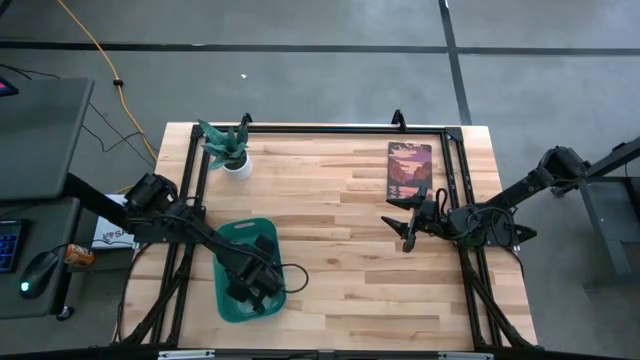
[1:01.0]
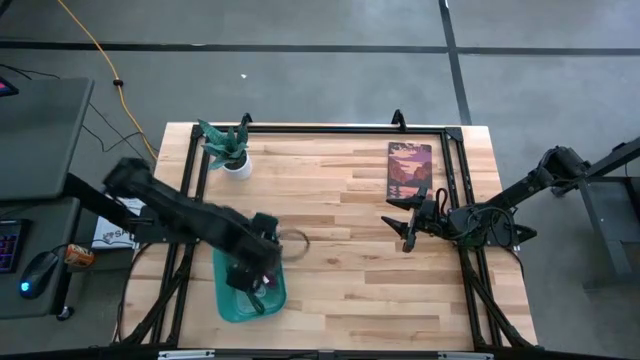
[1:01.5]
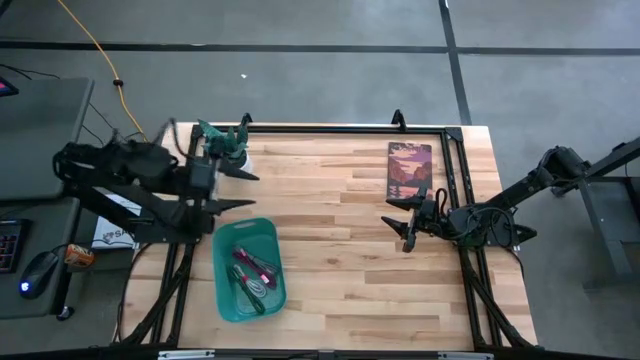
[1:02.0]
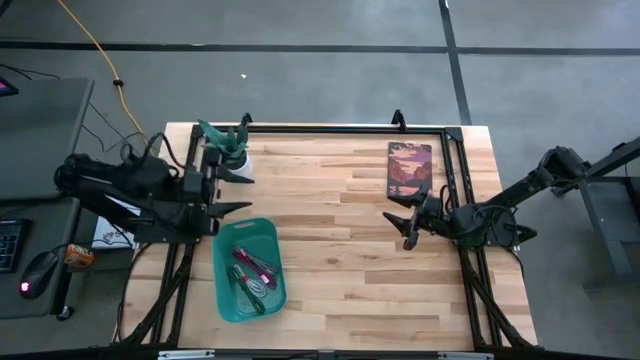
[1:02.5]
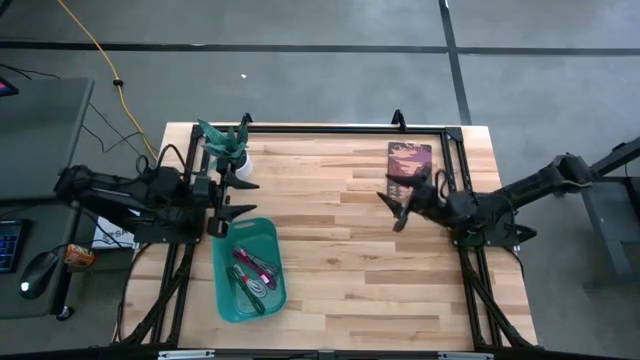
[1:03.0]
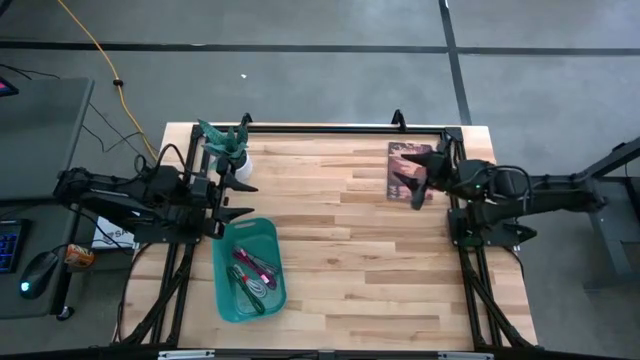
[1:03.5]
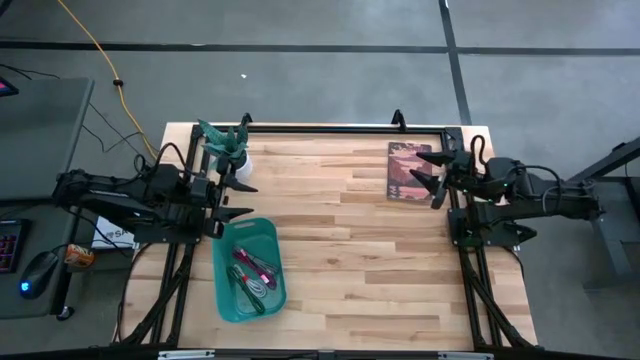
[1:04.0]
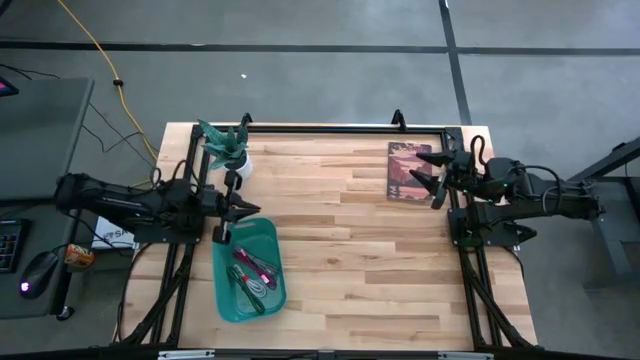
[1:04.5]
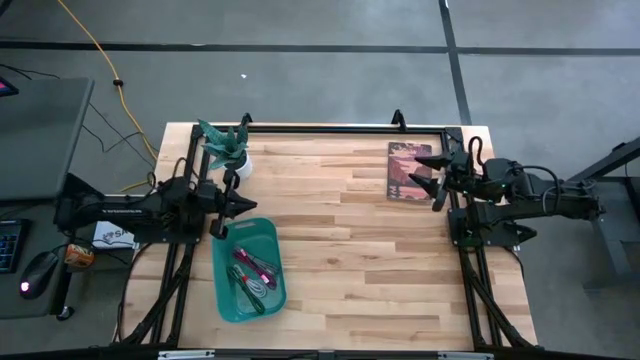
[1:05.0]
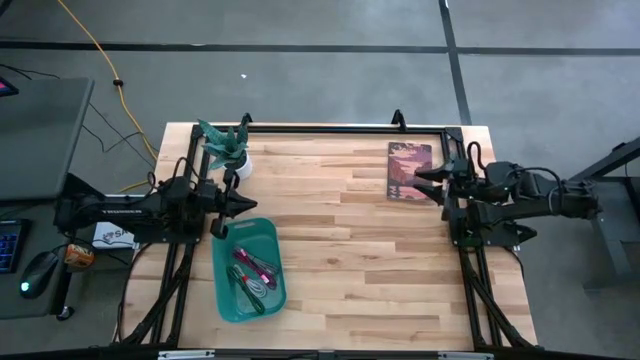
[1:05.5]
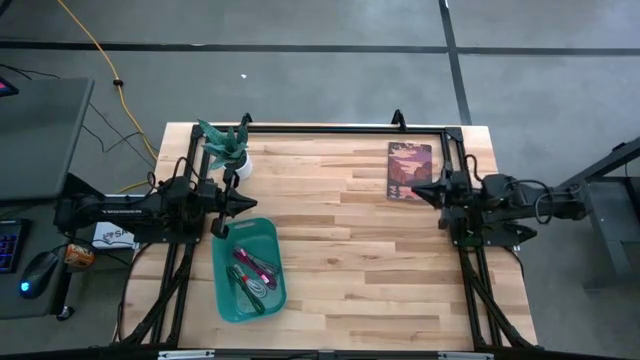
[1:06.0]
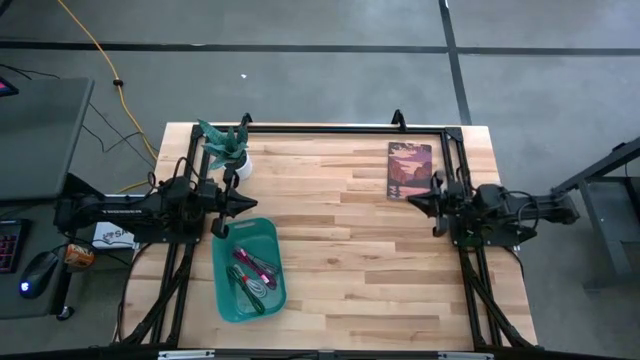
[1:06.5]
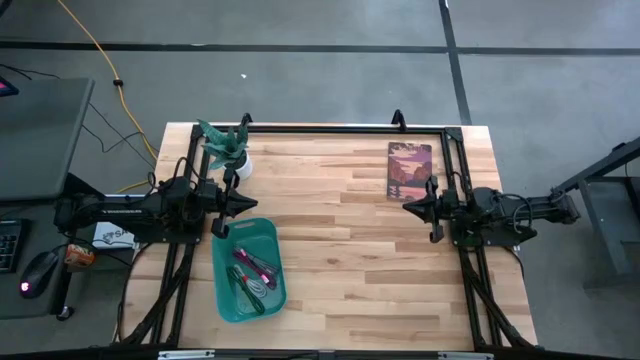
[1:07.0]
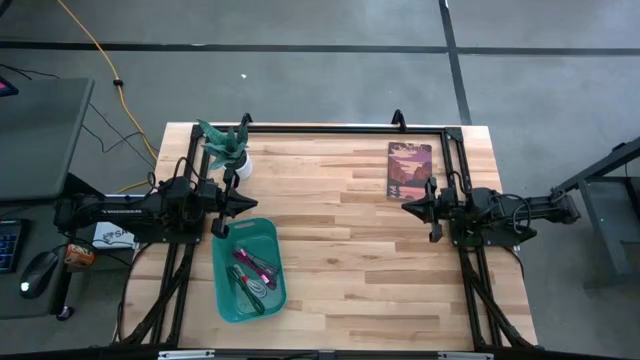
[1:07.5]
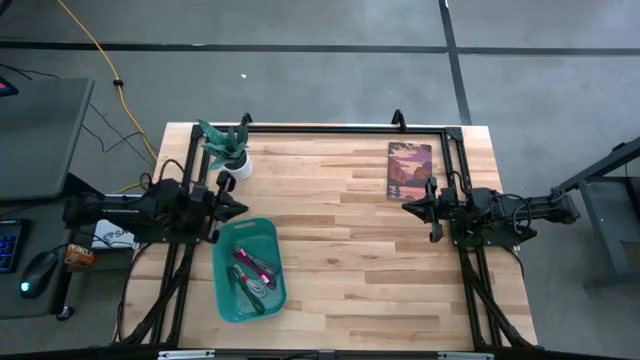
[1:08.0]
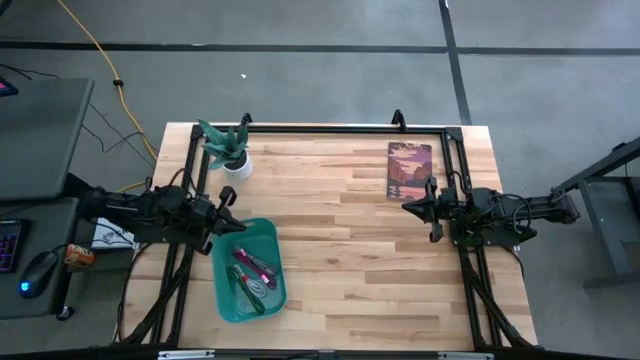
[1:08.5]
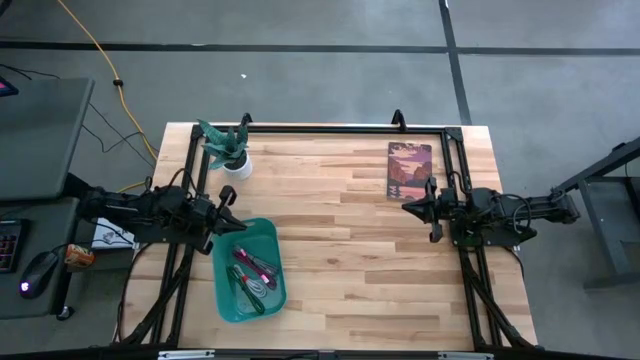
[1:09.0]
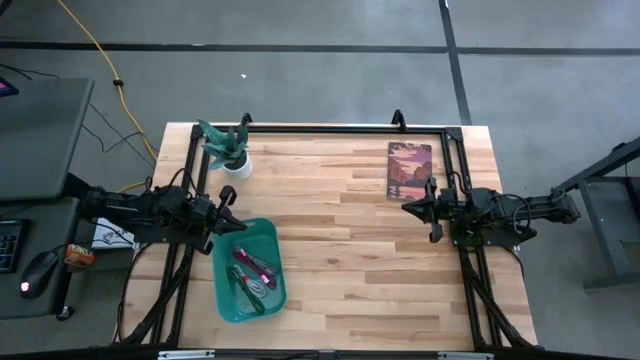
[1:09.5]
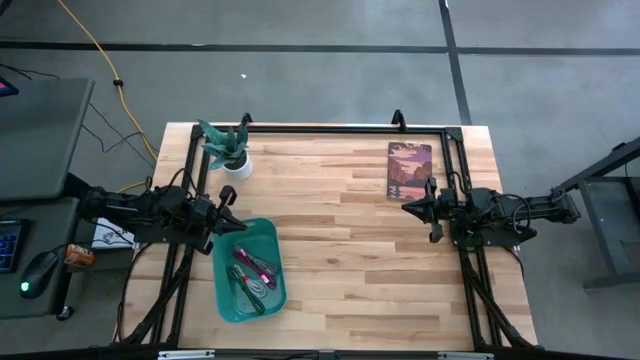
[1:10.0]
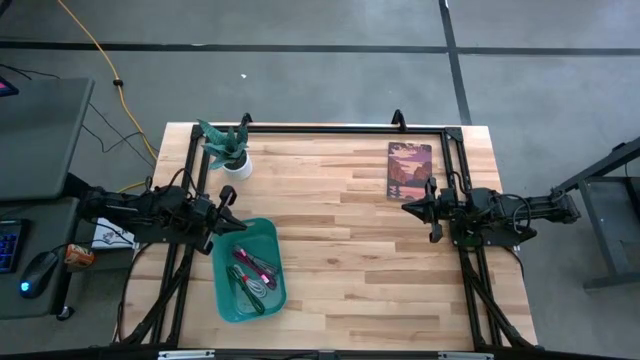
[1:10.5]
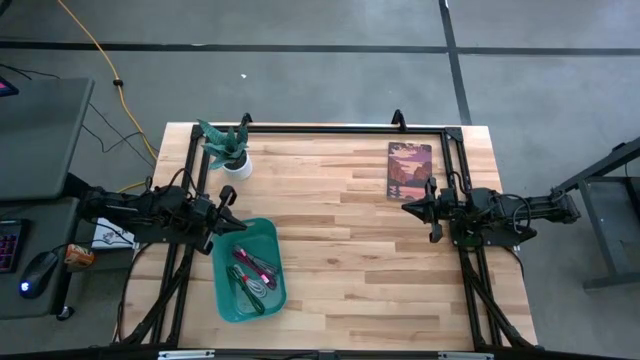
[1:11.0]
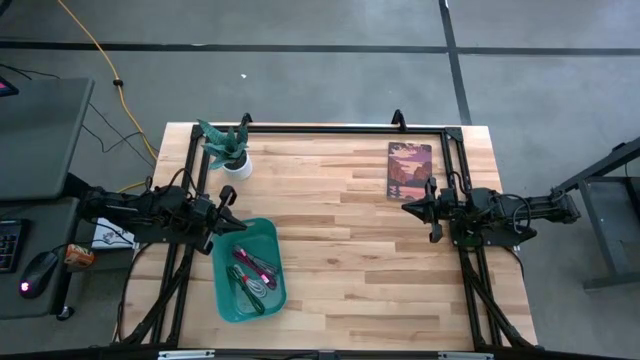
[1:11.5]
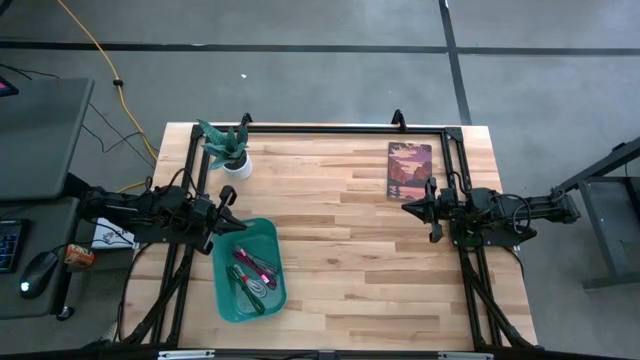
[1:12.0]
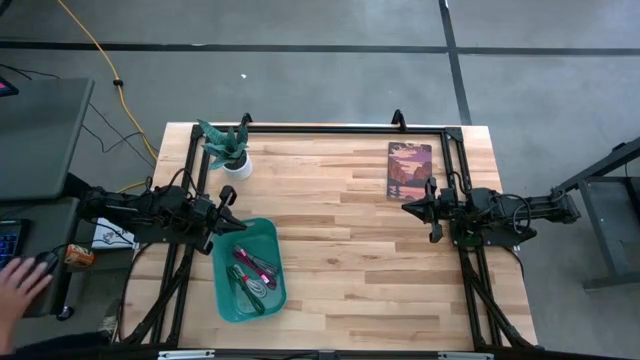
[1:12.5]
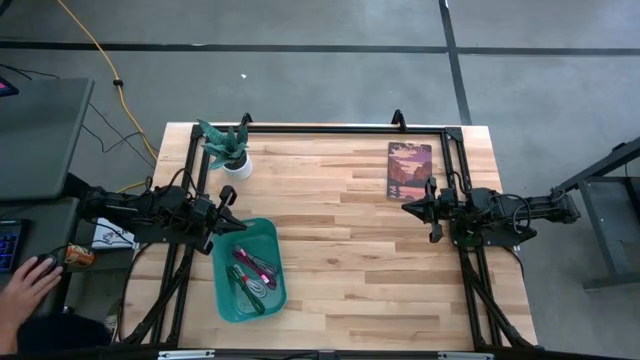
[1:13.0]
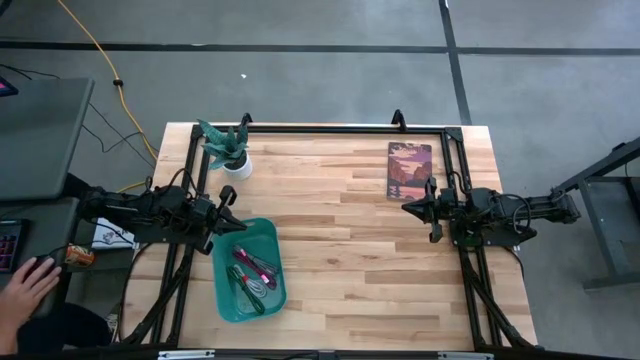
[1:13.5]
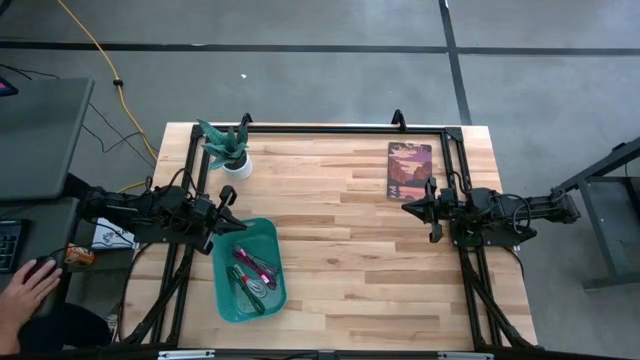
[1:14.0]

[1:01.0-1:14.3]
Task: Pick and place USB-C Cables
Return to Home Position

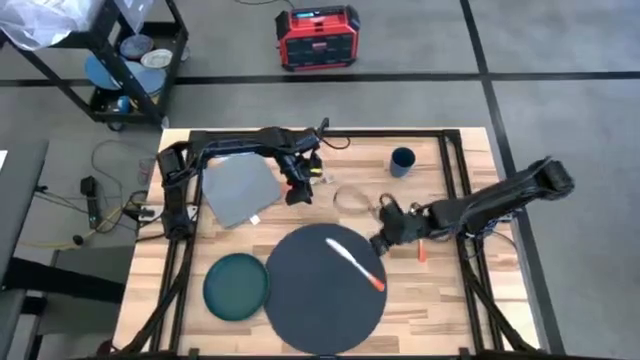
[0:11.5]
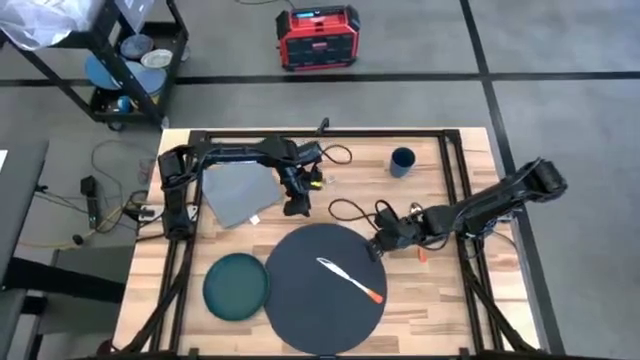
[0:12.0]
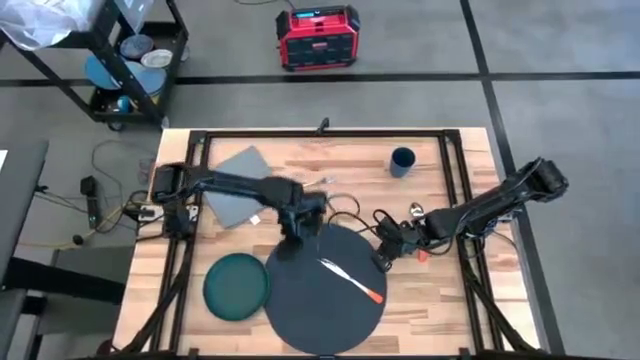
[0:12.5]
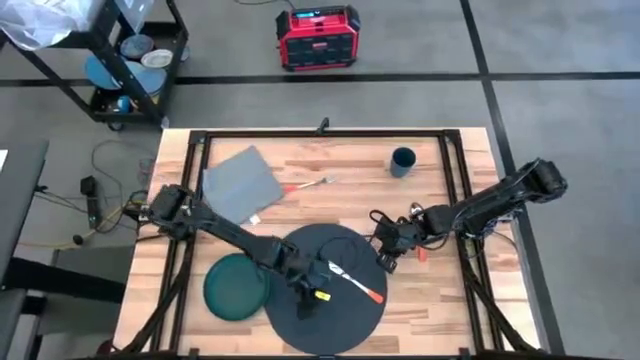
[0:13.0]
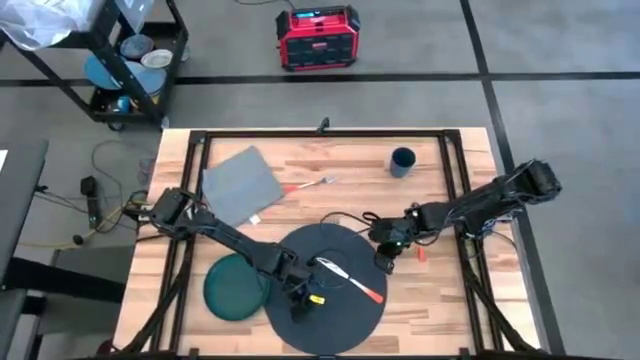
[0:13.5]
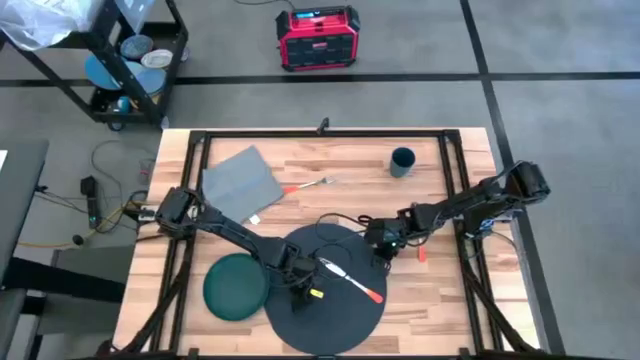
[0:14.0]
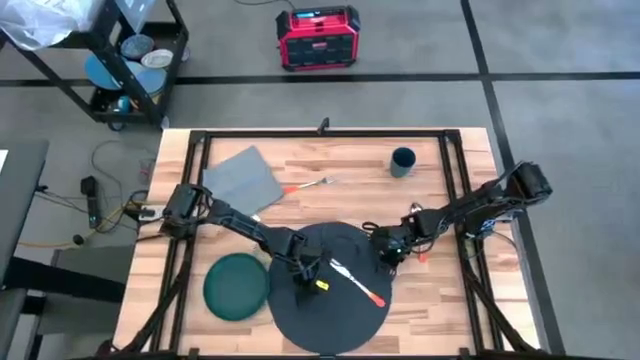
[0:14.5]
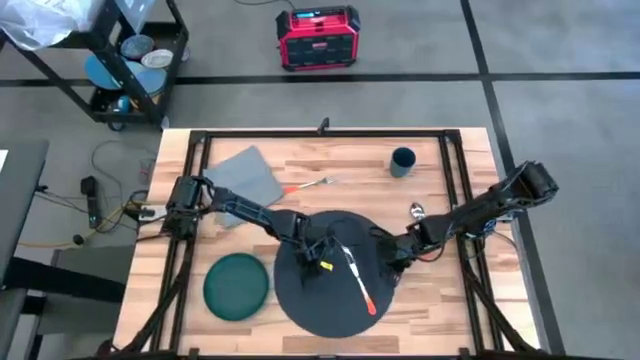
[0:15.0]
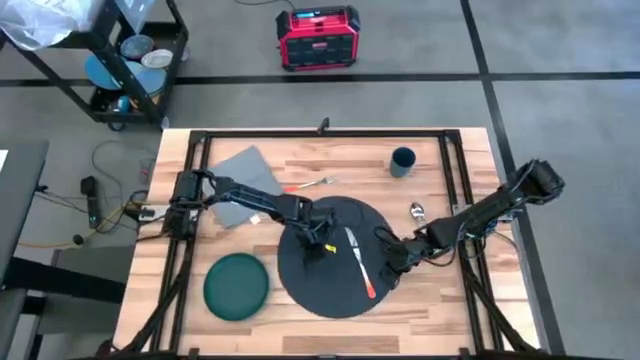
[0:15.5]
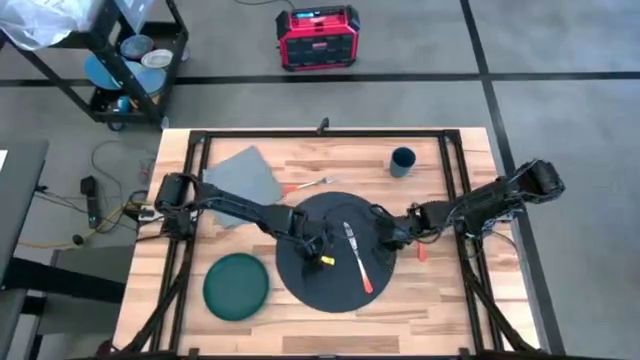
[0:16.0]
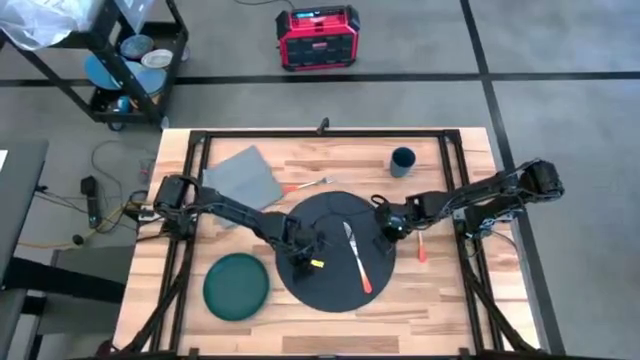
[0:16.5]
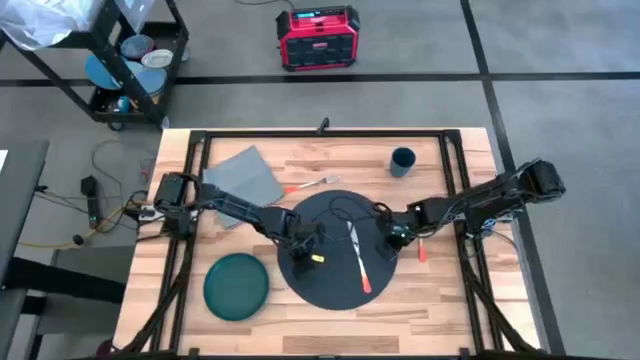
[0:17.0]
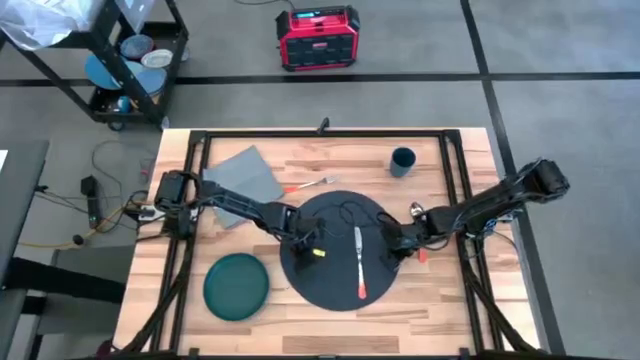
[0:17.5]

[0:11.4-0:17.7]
Task: Set table place
Adjust the blue tablemat

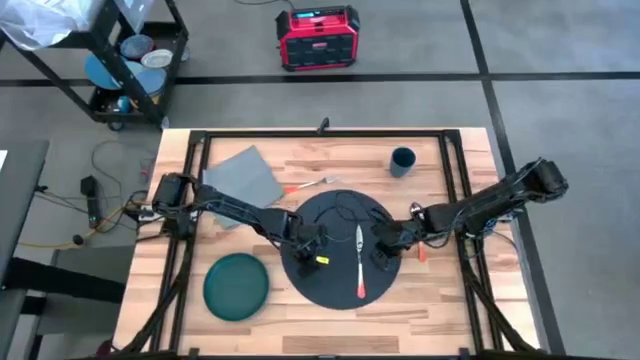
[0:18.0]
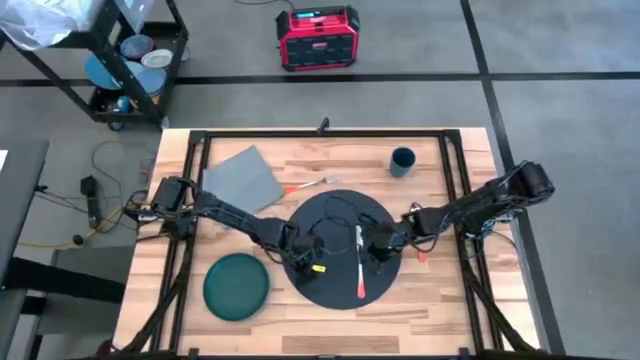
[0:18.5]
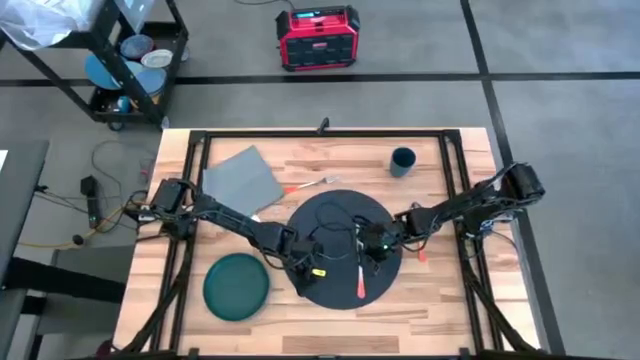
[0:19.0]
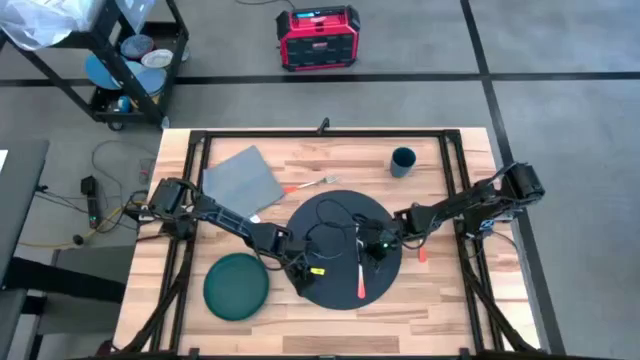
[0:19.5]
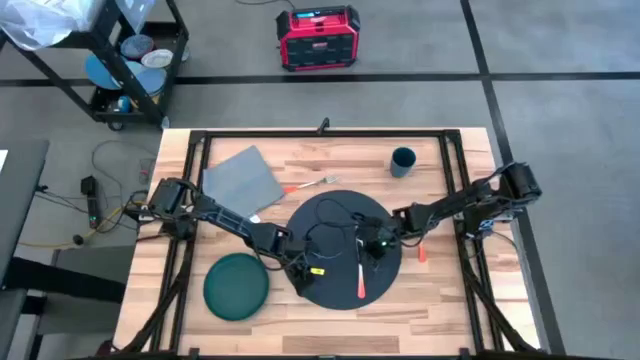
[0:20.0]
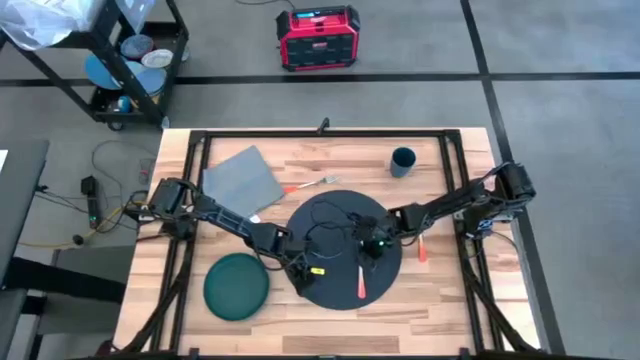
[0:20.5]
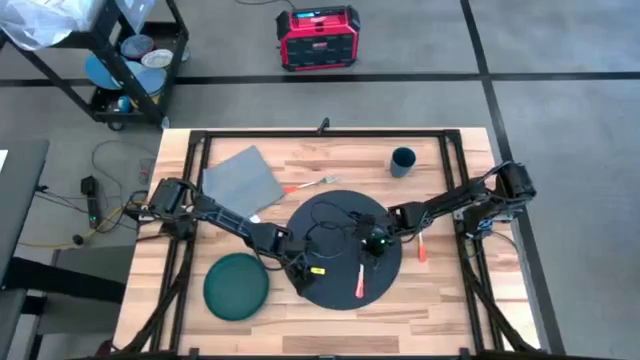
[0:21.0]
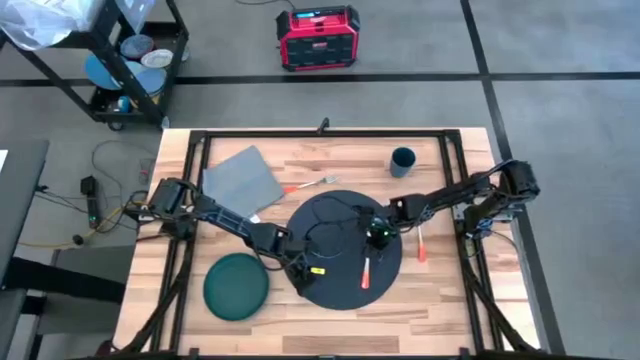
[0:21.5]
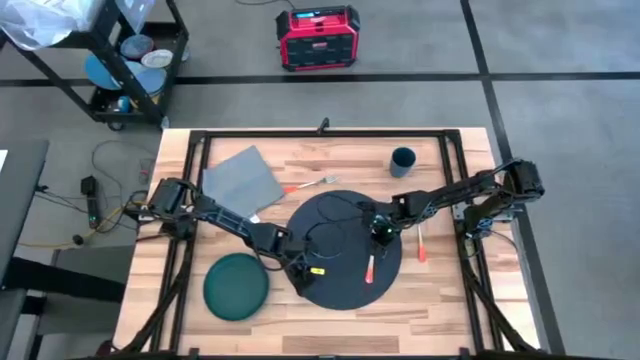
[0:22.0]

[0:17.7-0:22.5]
Adjust the orange table knife on the blue tablemat
